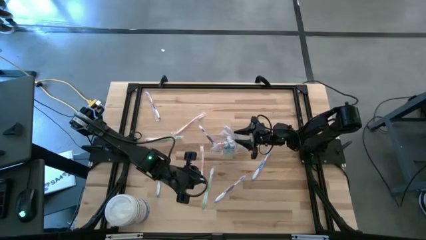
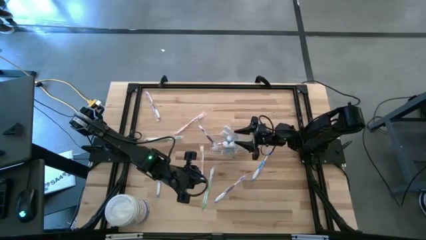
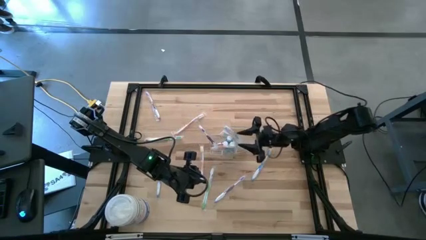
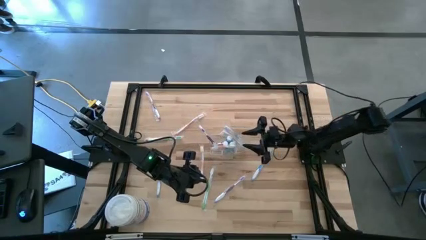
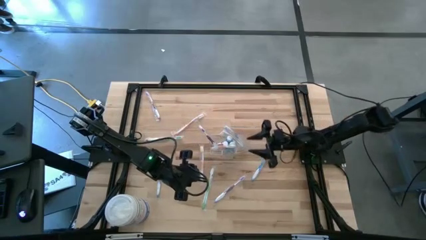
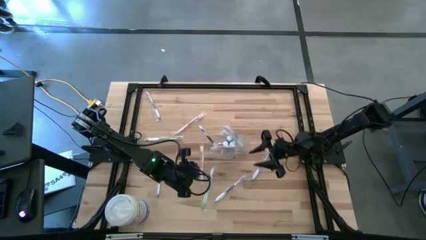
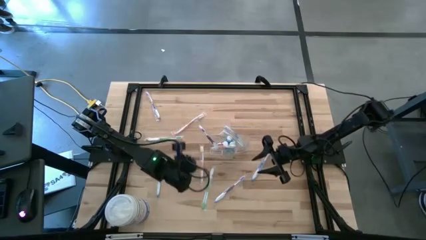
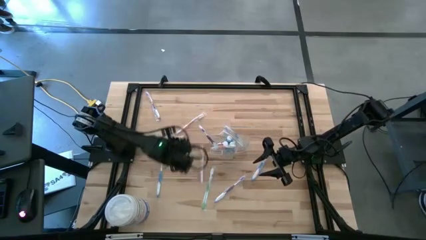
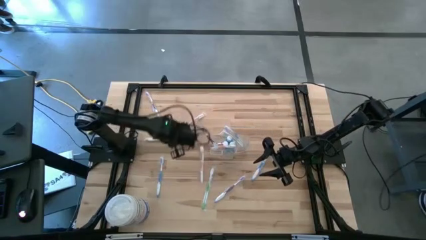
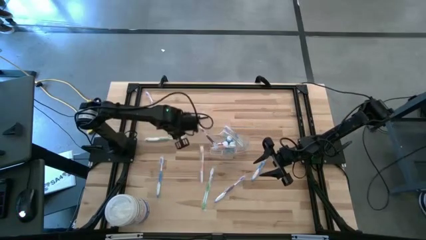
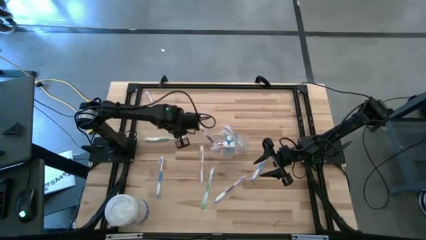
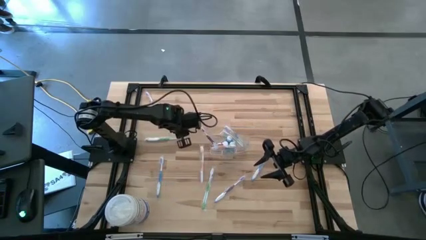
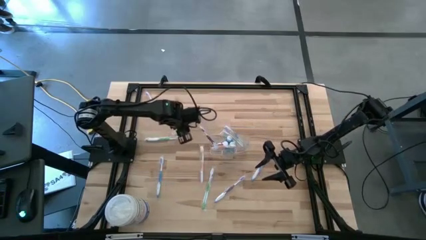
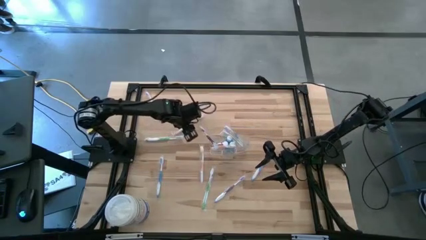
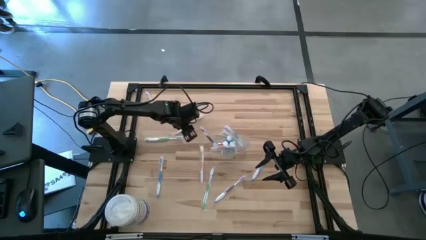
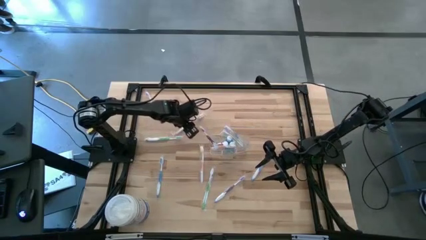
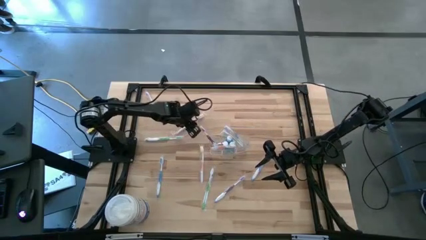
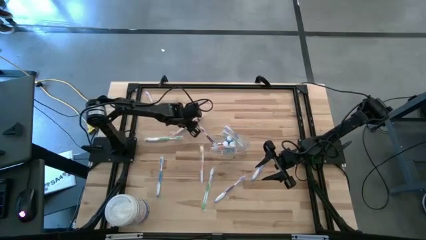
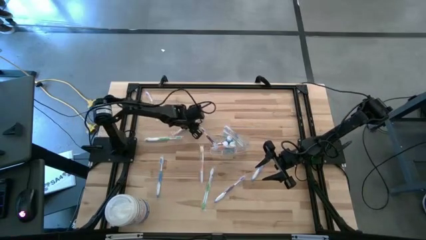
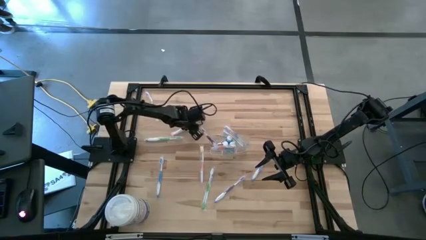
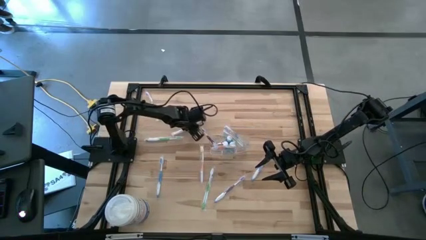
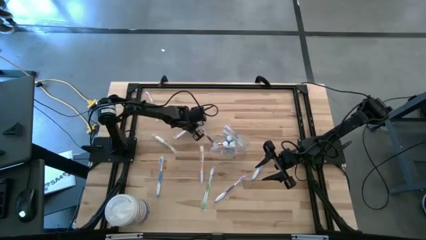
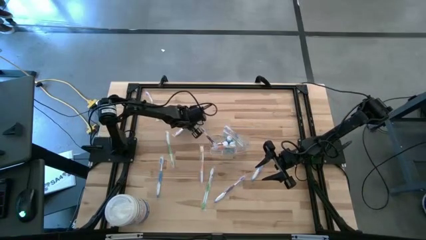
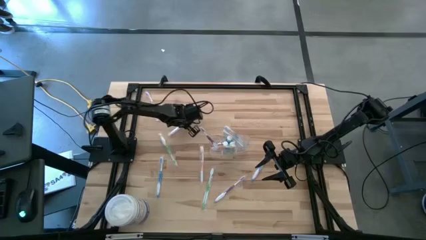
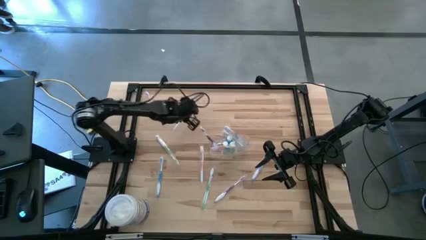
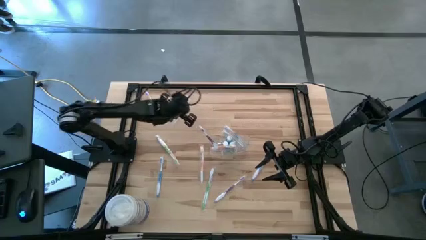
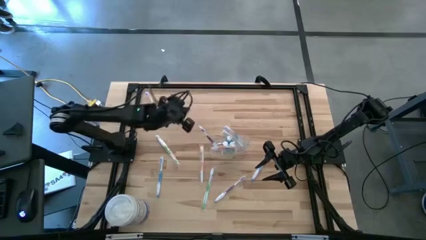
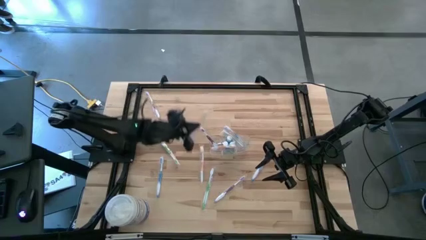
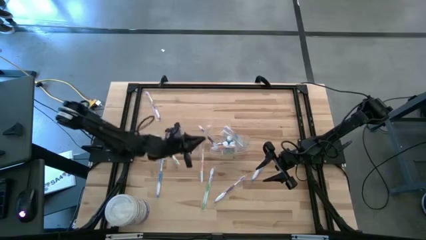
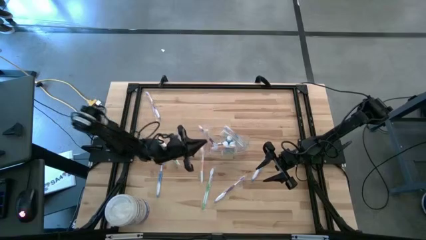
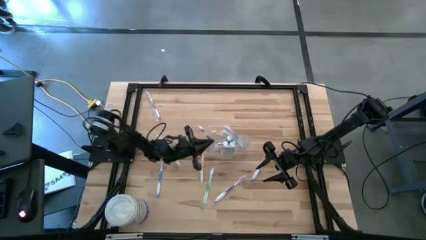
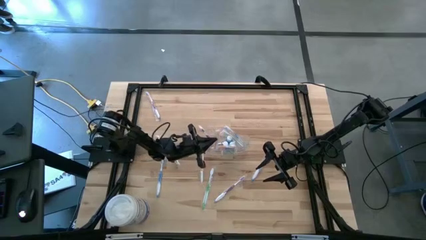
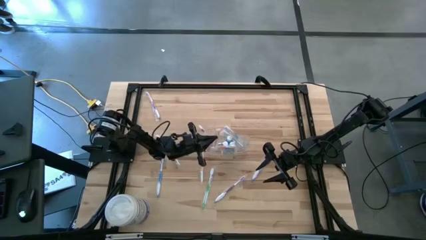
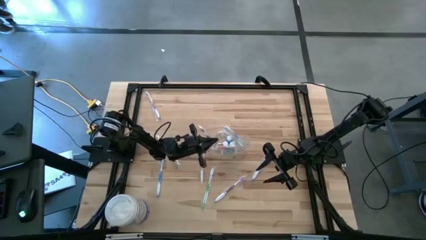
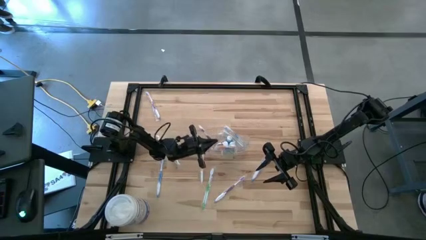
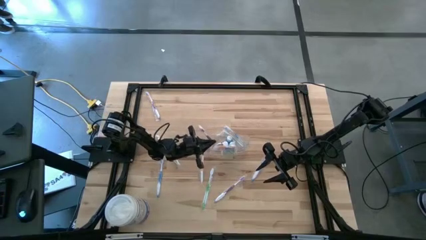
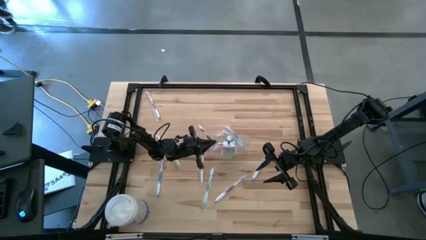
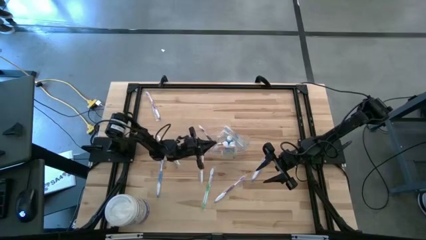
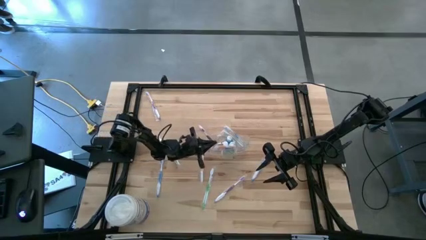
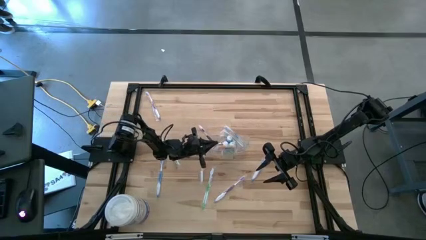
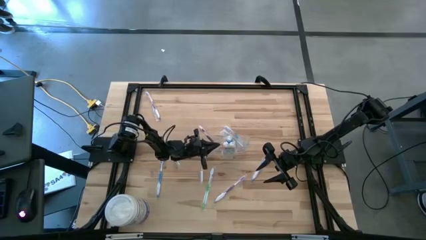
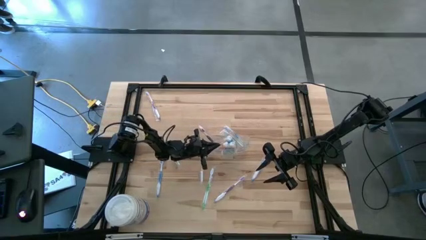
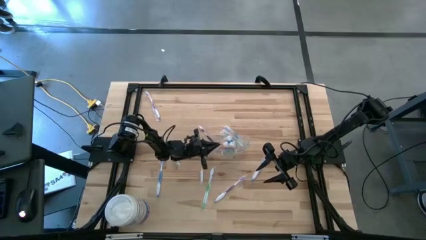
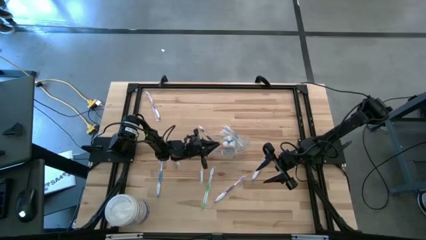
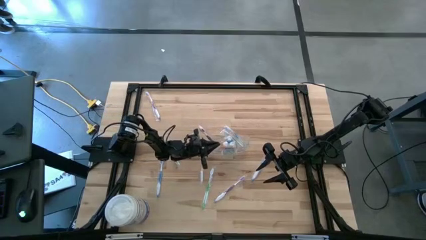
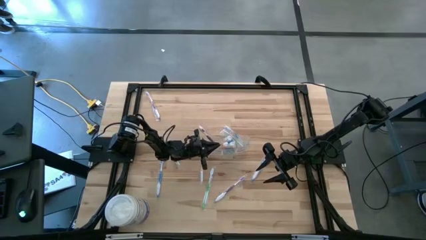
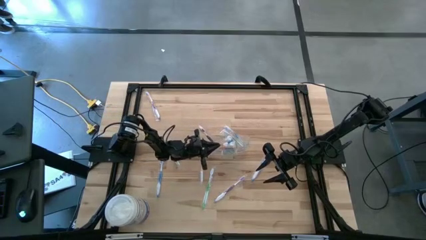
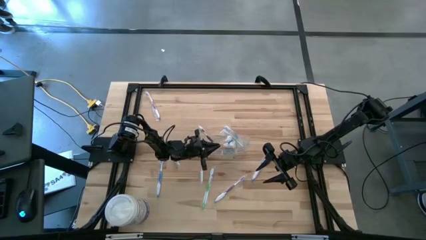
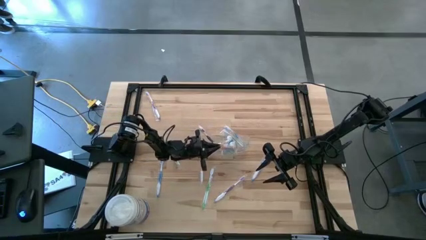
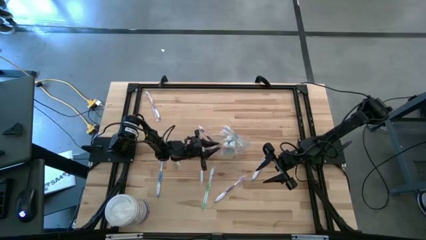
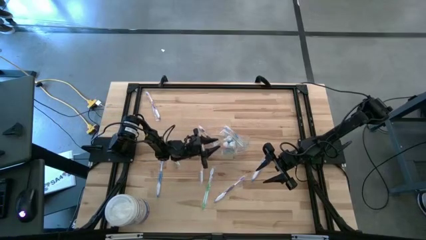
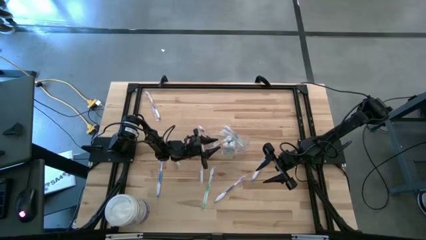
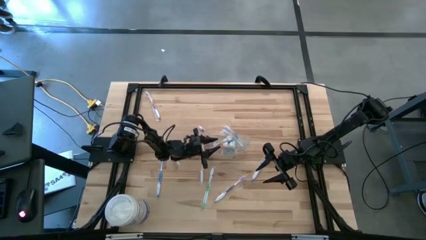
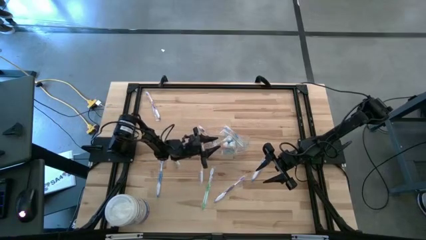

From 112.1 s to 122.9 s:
Task: Pick & Place toothbrushing station
Put the top orange toothbrush into the wire organizer
